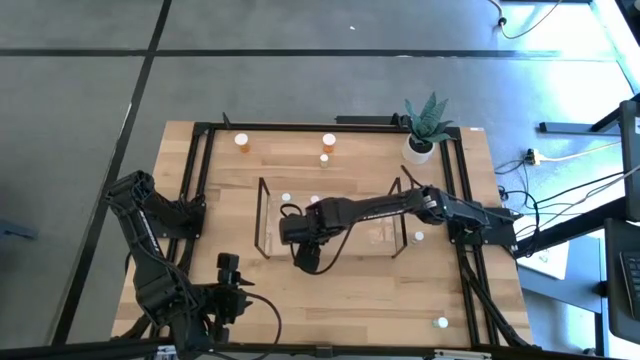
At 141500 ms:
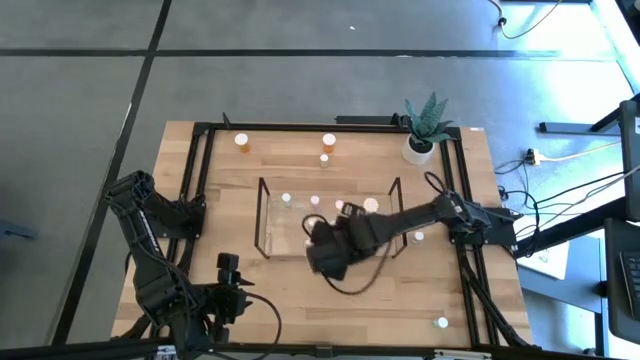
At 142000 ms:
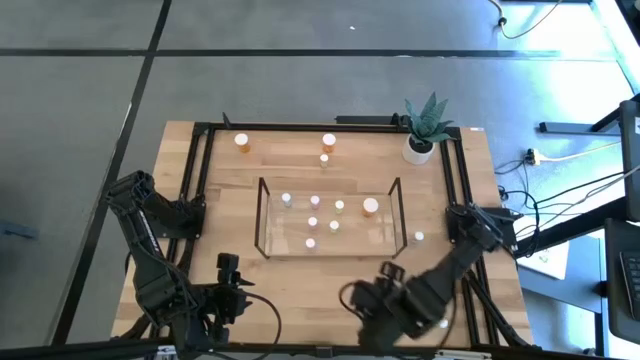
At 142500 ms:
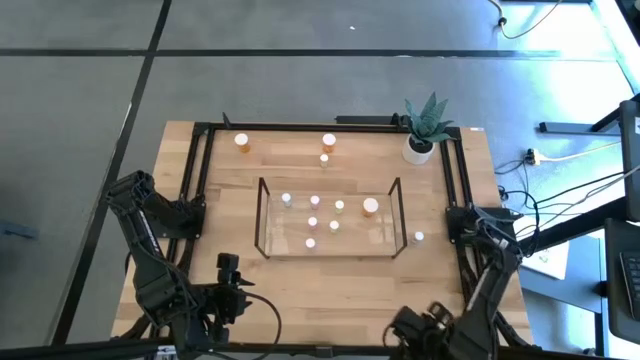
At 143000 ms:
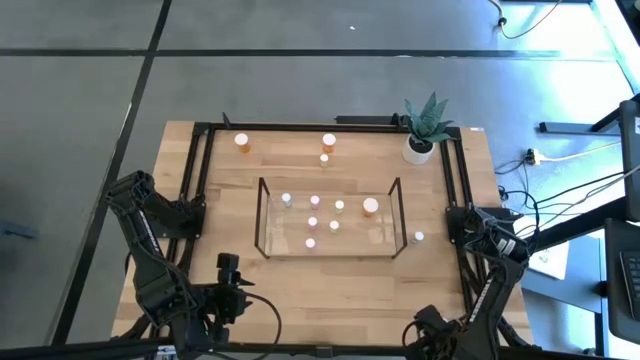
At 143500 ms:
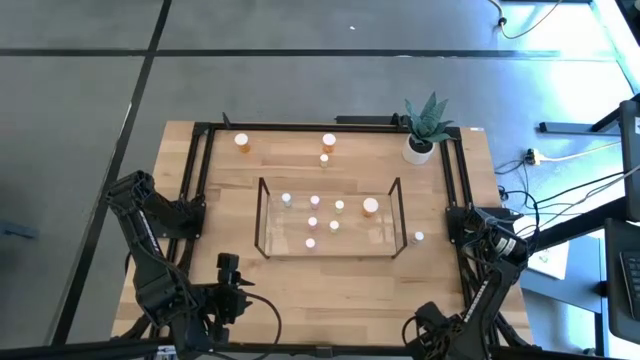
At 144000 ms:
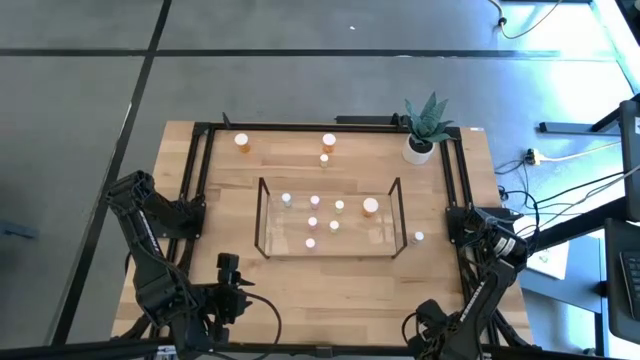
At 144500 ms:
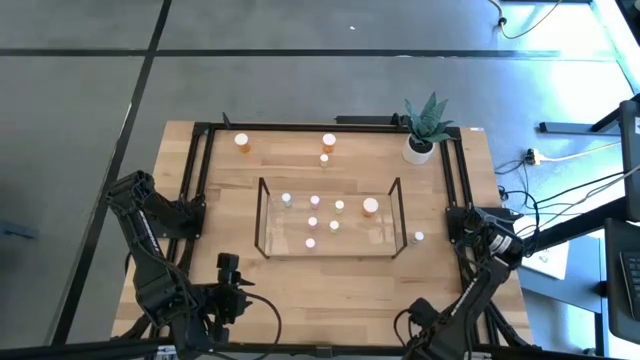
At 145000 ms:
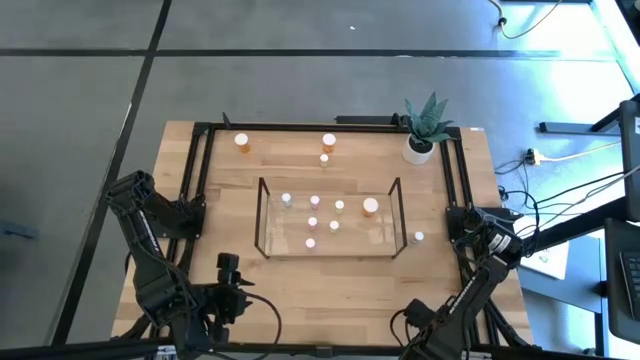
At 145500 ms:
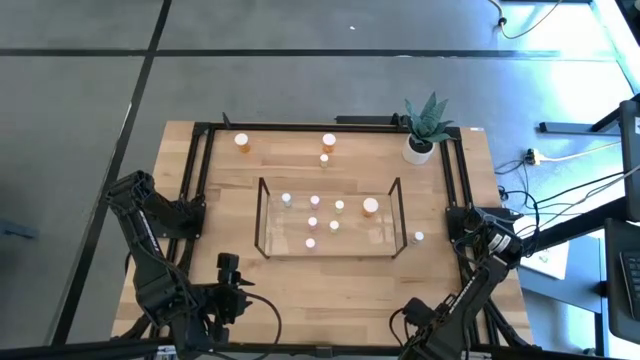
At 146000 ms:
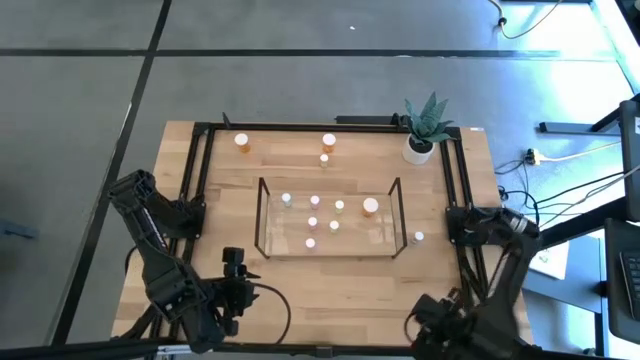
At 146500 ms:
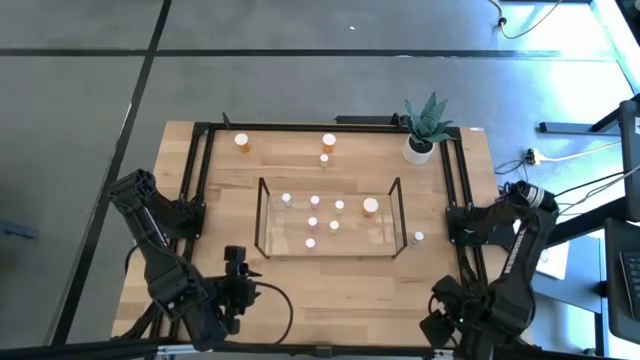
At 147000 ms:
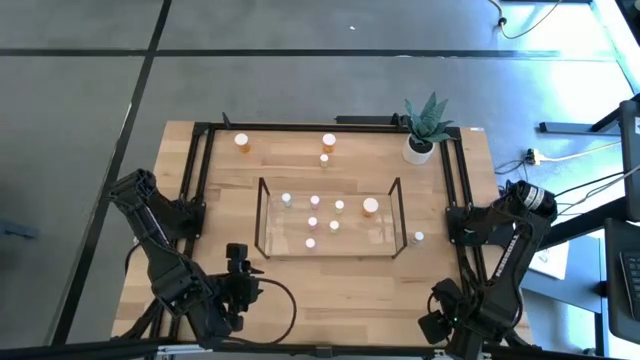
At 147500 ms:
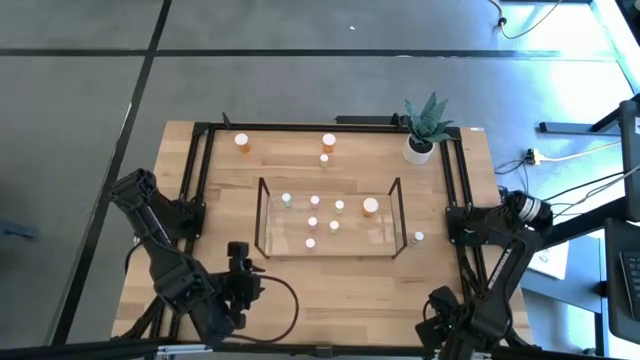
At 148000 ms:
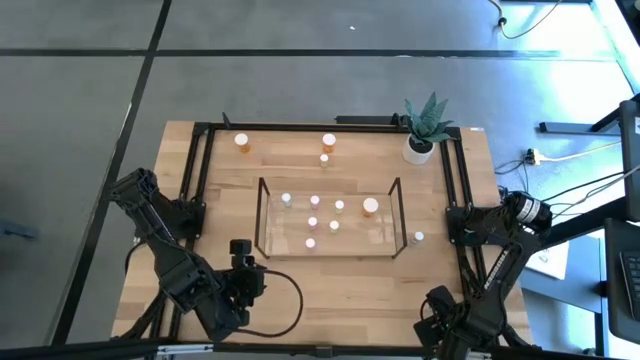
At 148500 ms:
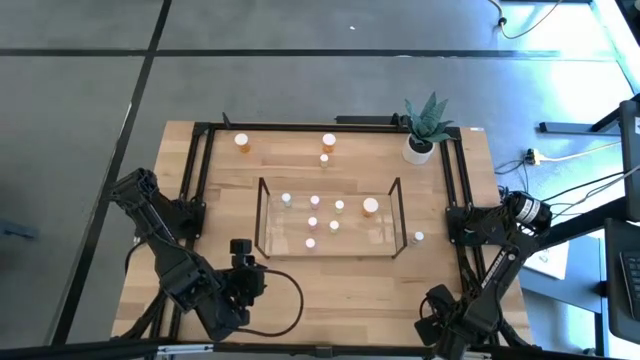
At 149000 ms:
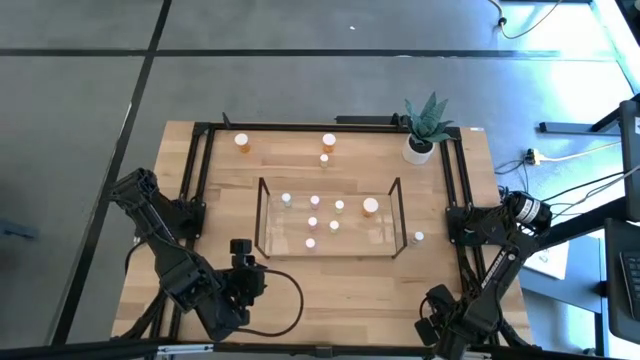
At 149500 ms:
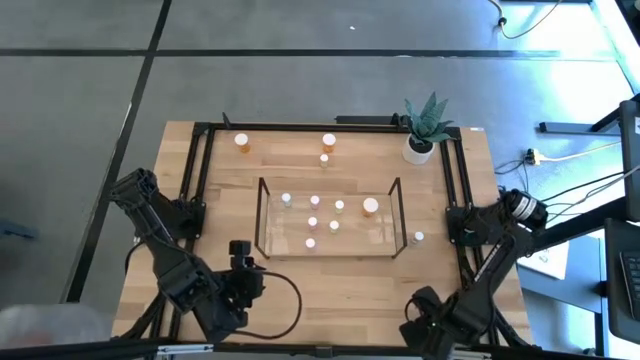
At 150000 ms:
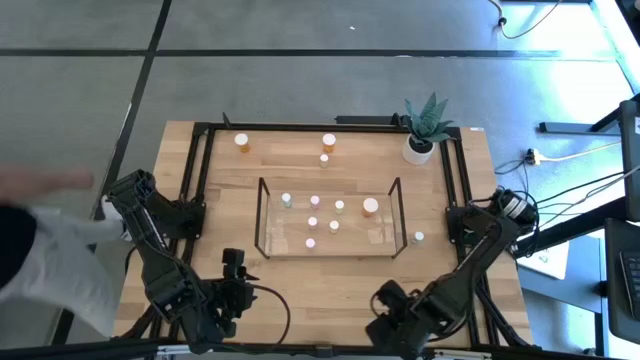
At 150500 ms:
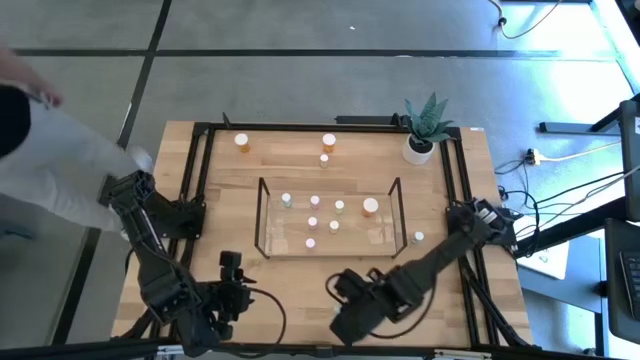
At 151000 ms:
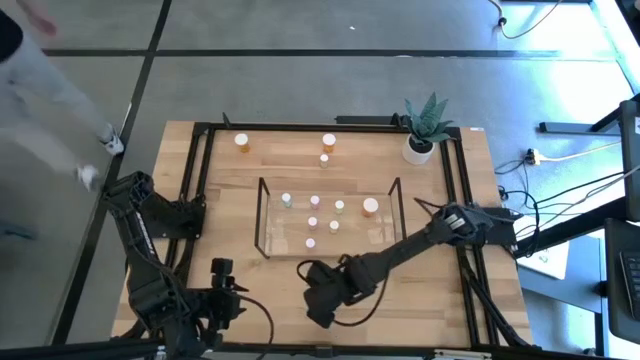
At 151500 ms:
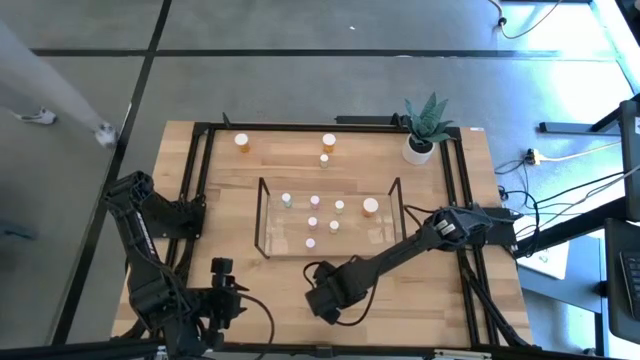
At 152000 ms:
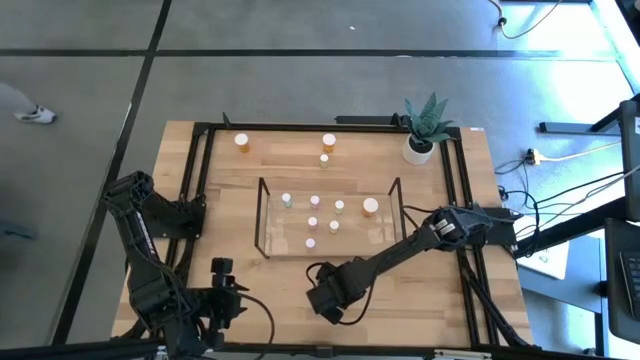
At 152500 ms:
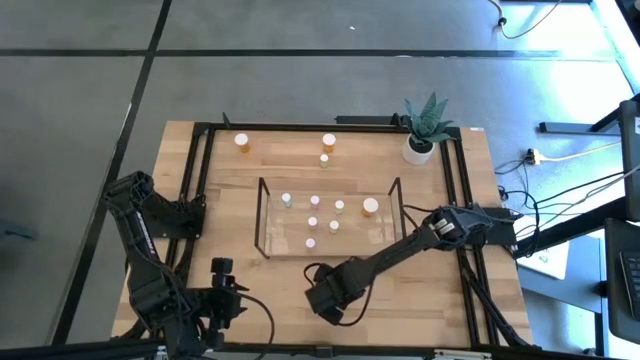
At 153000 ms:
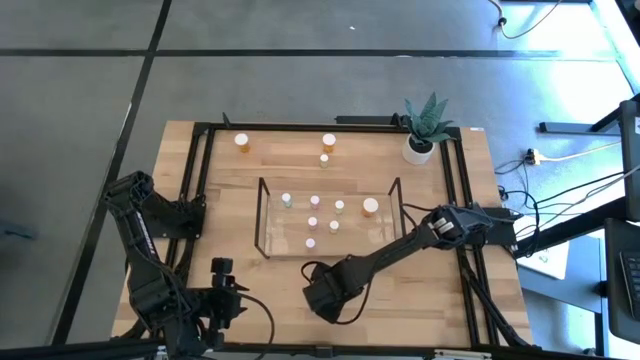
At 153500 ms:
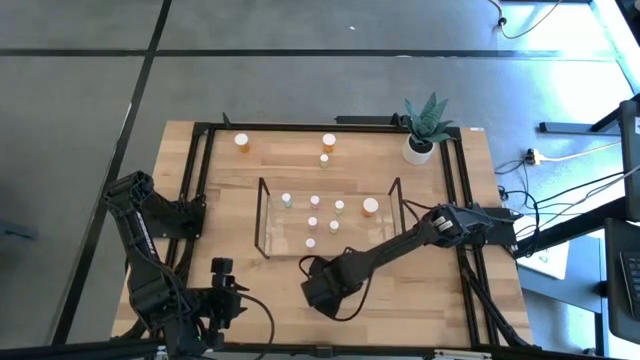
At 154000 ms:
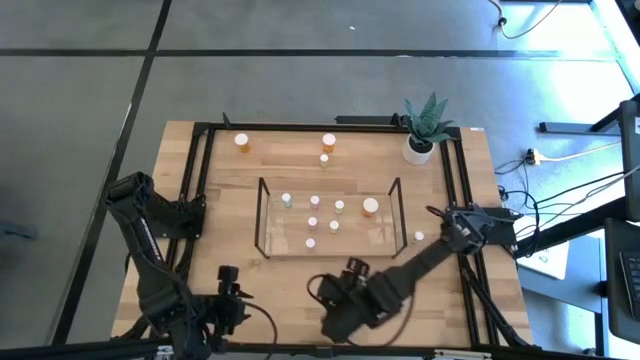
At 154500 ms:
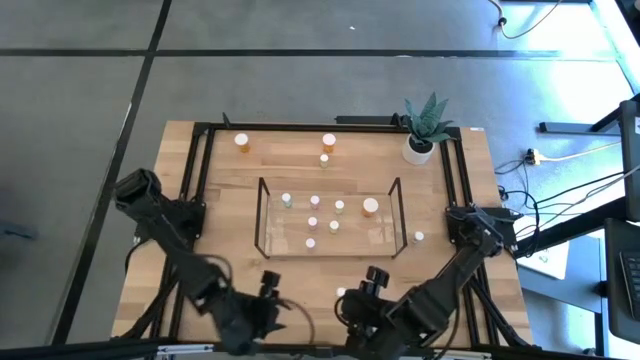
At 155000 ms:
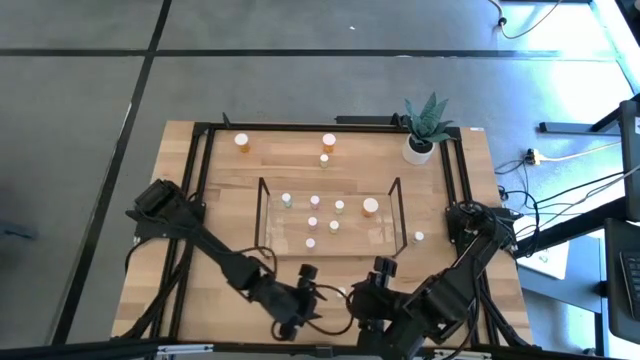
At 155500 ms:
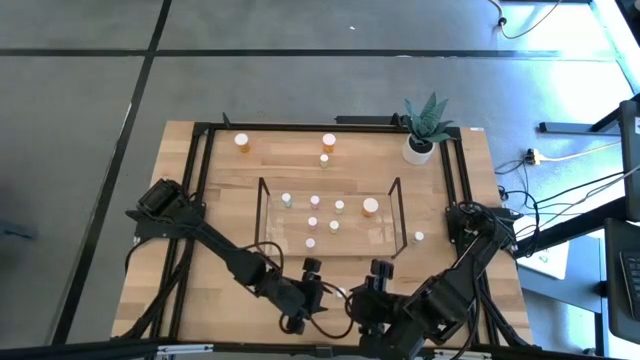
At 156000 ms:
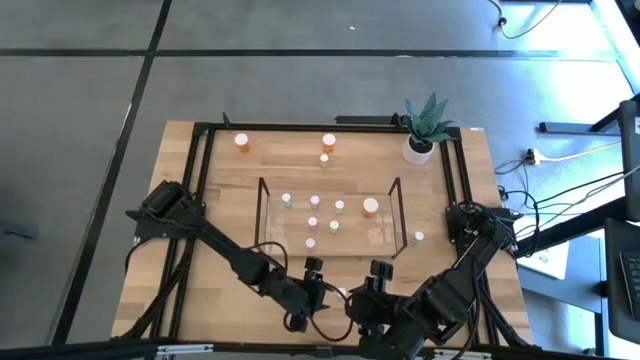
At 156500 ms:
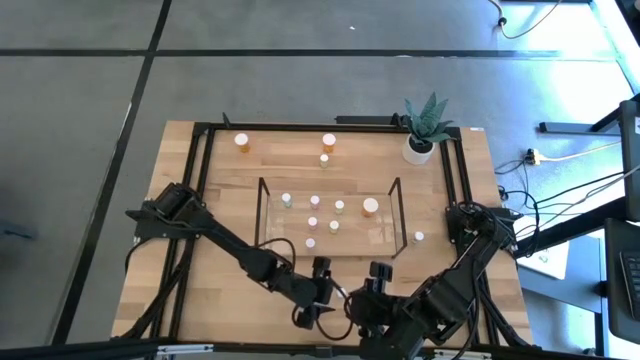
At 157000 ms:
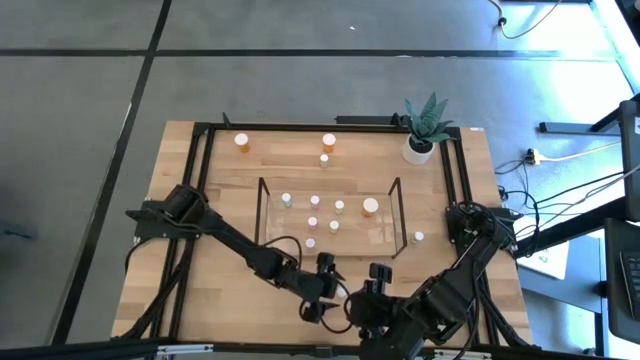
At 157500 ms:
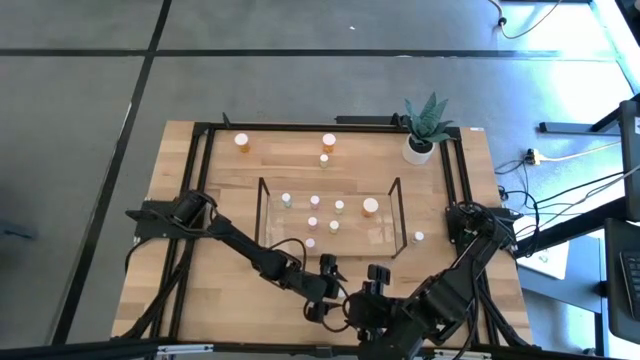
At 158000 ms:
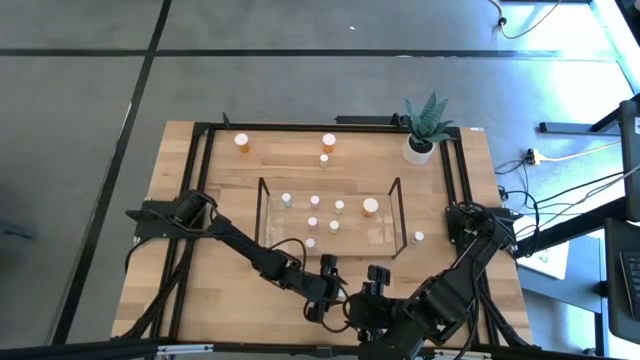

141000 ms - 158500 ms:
Task: Pick and place medicine bottles onto shelf by color
Put the bottom blue pill bottle on the shelf aligned with the other blue pill bottle

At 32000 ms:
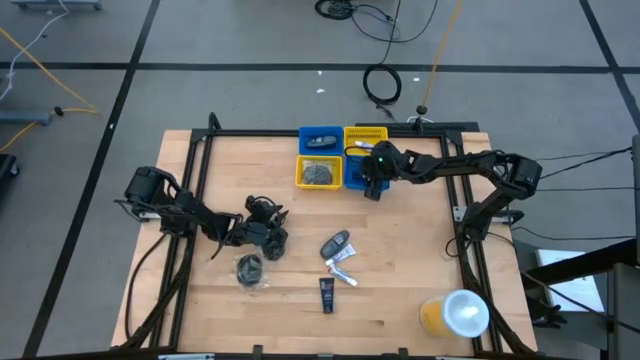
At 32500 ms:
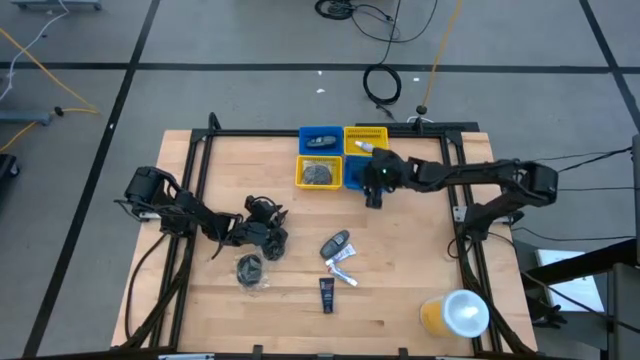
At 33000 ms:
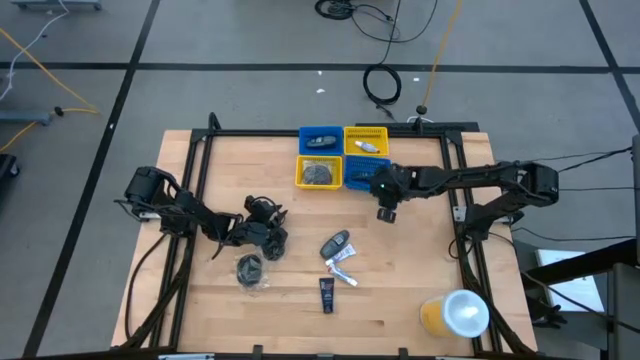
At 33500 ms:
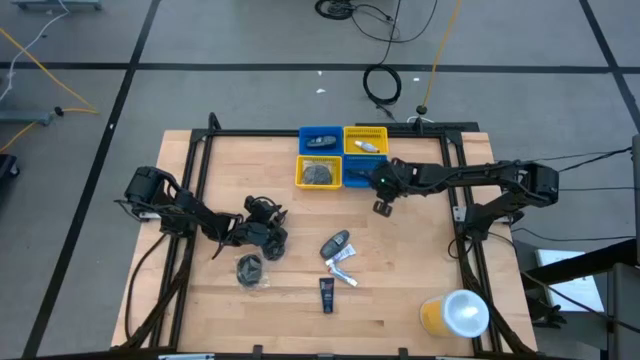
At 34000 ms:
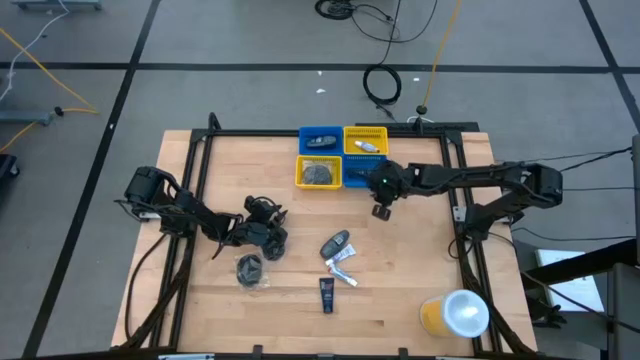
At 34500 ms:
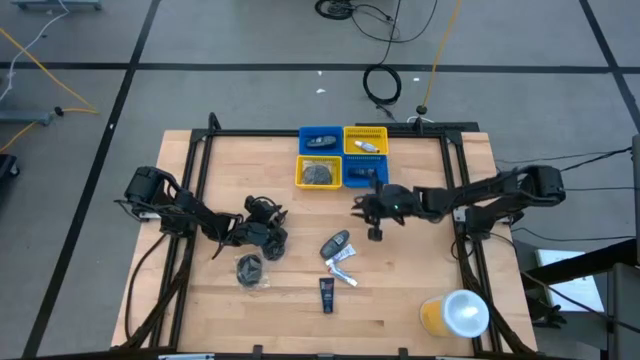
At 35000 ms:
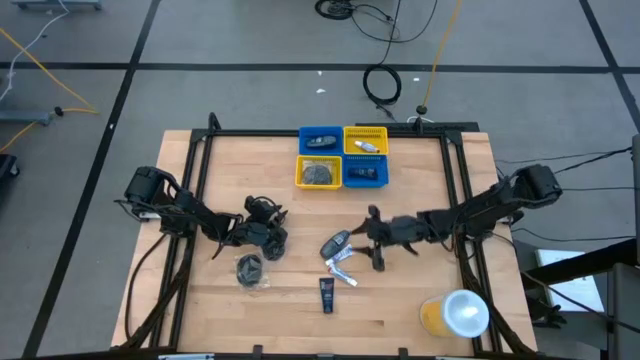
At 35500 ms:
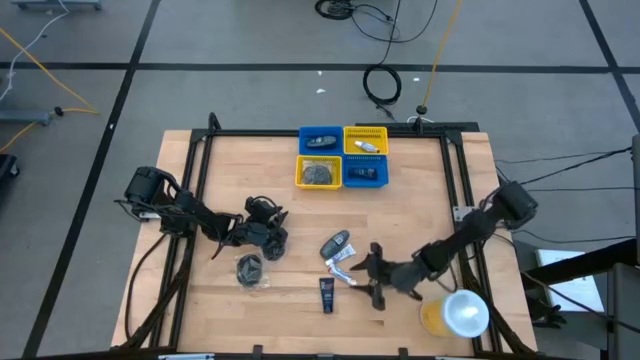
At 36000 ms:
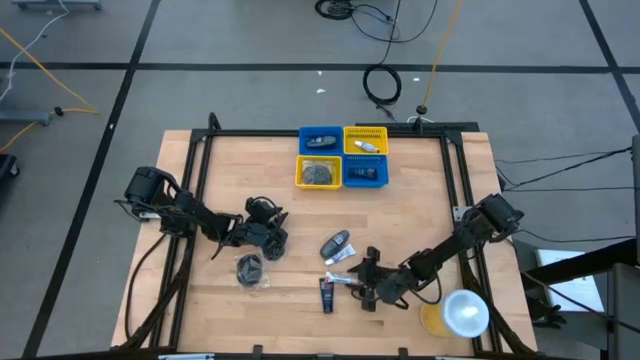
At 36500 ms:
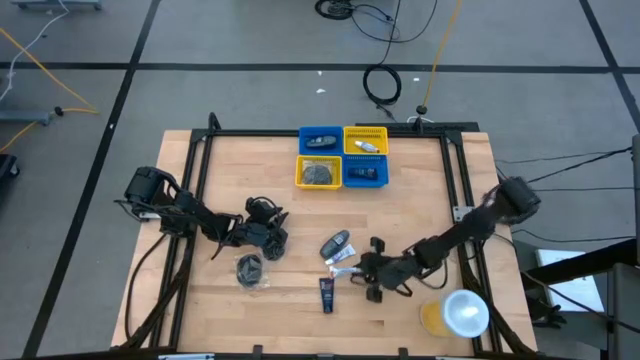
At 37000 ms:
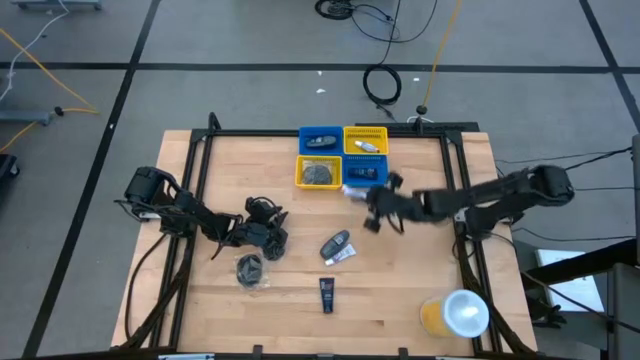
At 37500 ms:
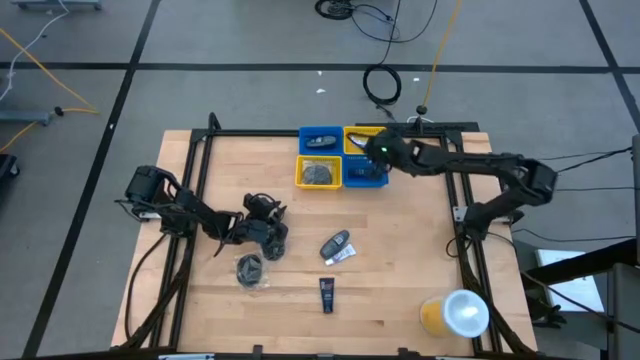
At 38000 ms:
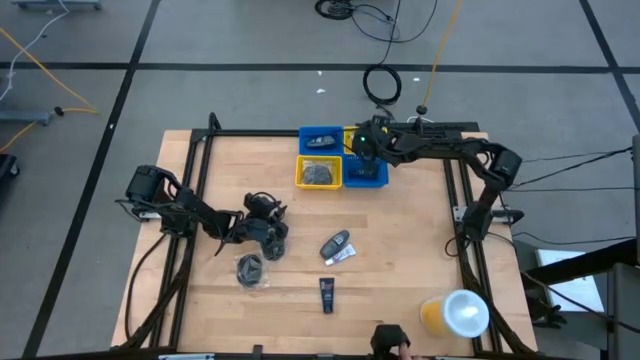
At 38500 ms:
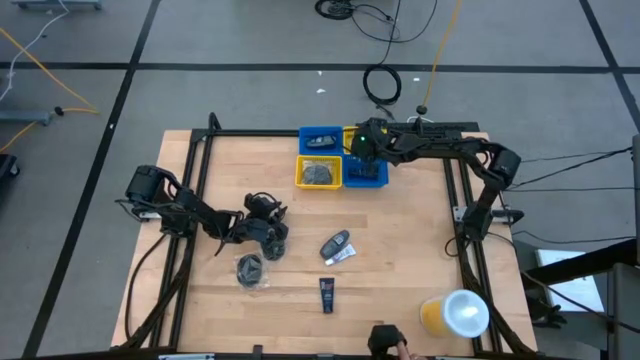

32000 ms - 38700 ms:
Task: Pick & Place Travel size toiletries
Put the white toothpaste into the right yellow bin
